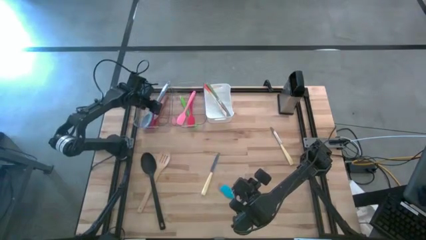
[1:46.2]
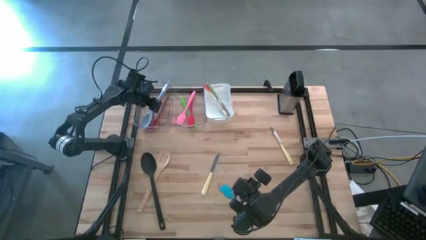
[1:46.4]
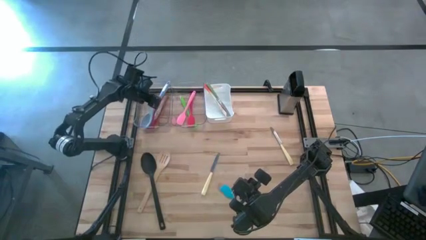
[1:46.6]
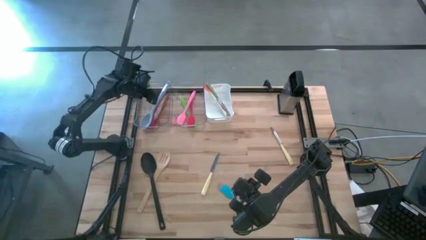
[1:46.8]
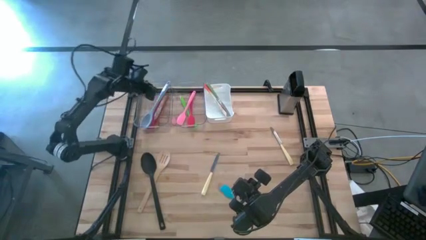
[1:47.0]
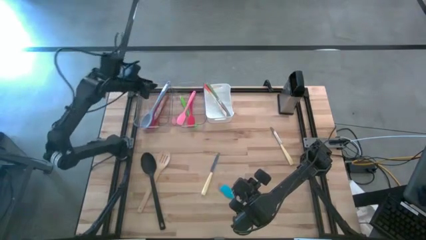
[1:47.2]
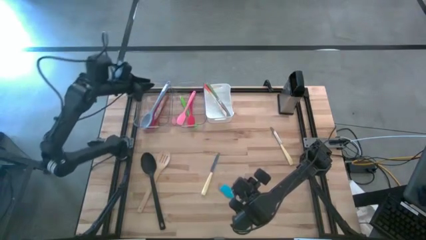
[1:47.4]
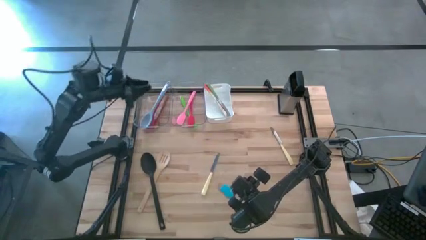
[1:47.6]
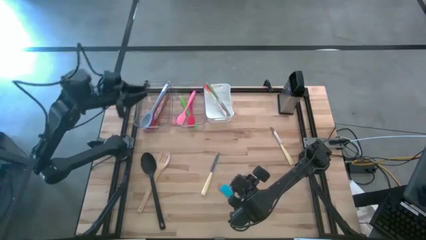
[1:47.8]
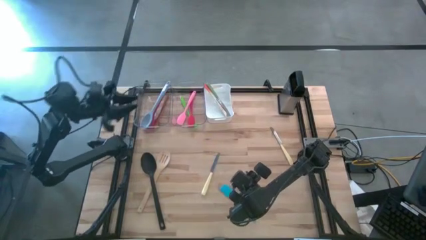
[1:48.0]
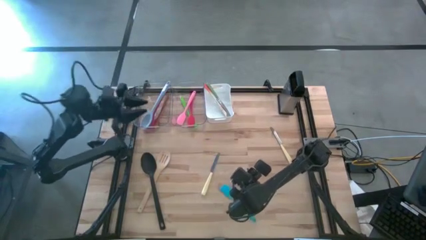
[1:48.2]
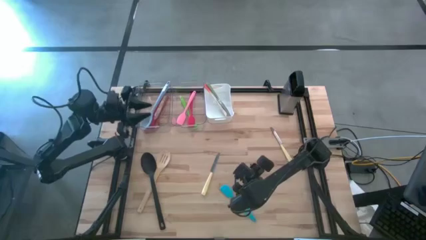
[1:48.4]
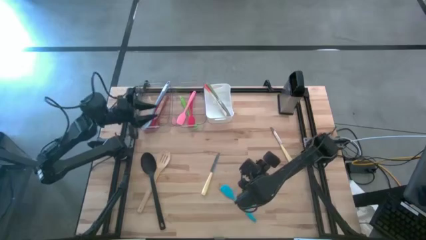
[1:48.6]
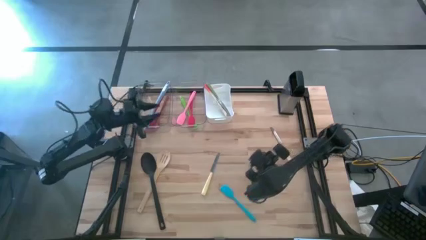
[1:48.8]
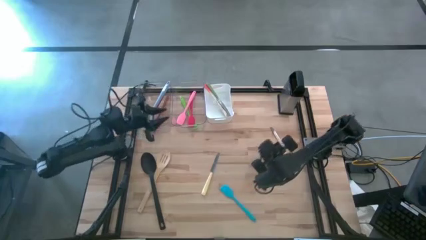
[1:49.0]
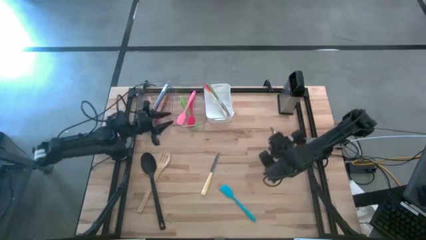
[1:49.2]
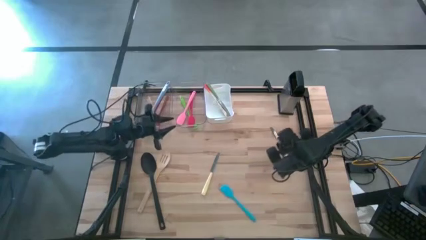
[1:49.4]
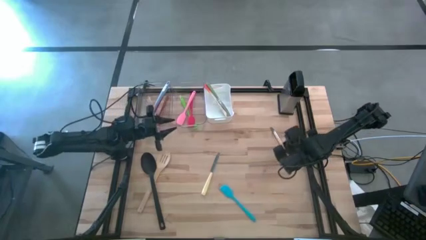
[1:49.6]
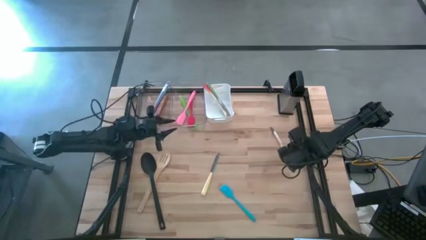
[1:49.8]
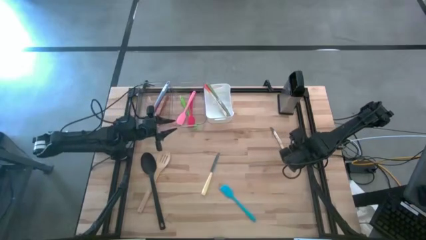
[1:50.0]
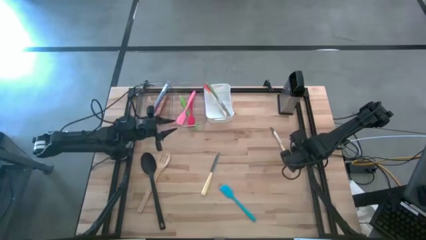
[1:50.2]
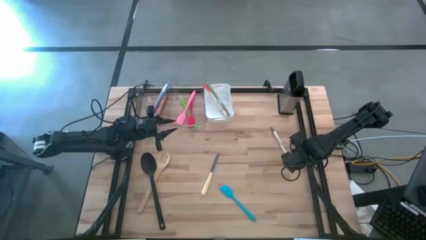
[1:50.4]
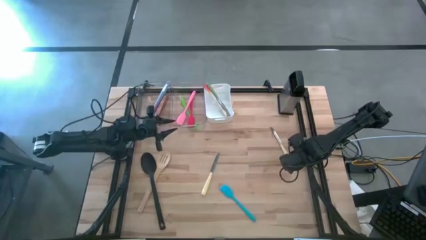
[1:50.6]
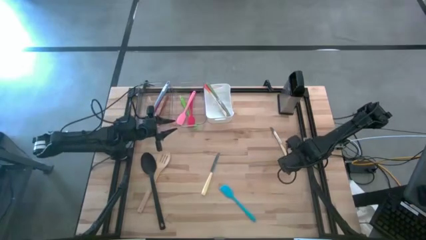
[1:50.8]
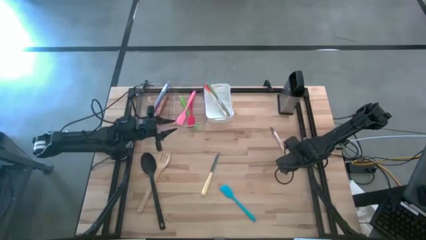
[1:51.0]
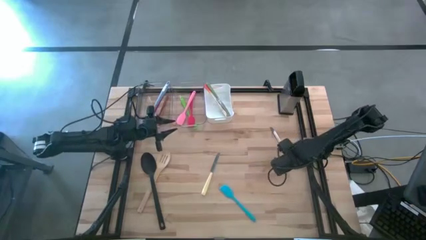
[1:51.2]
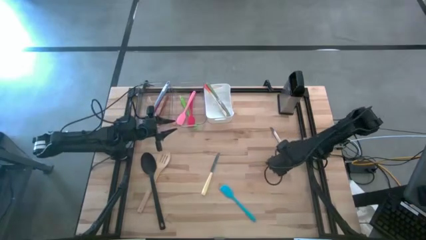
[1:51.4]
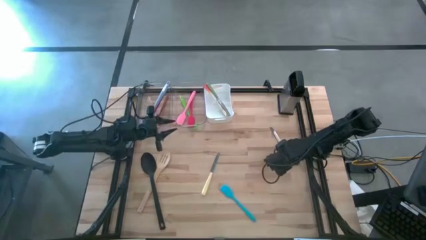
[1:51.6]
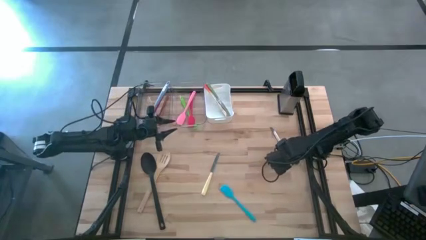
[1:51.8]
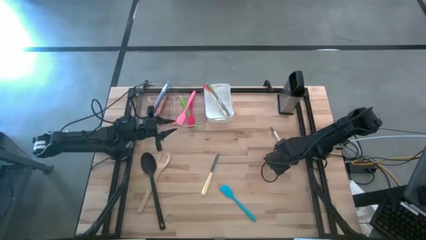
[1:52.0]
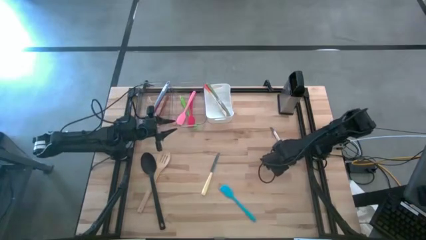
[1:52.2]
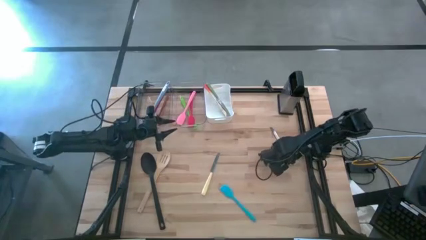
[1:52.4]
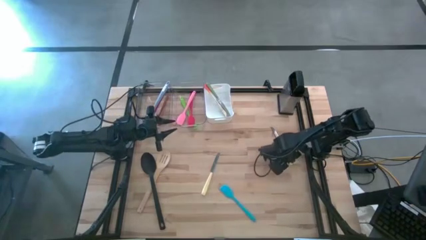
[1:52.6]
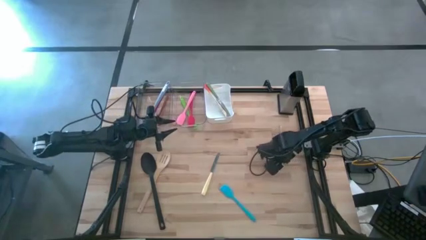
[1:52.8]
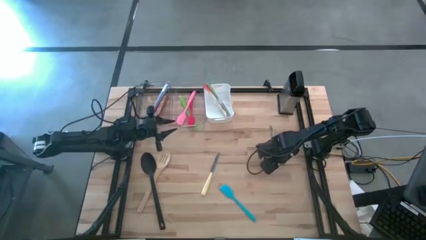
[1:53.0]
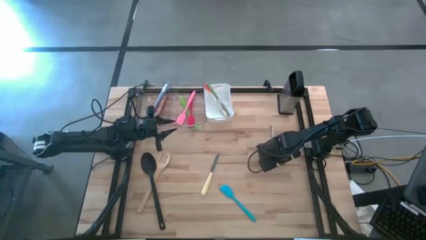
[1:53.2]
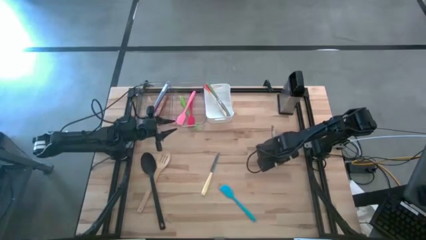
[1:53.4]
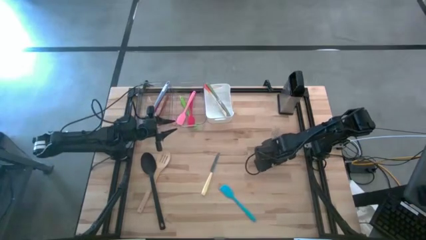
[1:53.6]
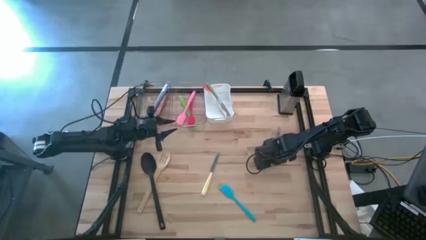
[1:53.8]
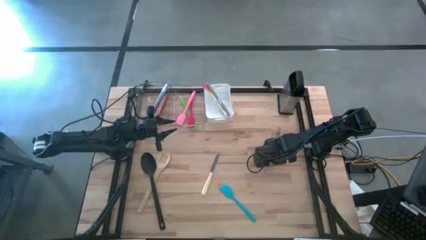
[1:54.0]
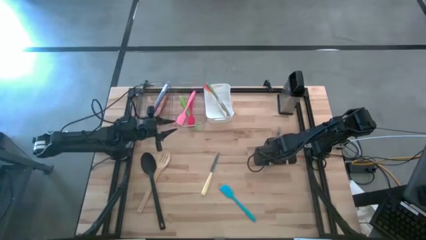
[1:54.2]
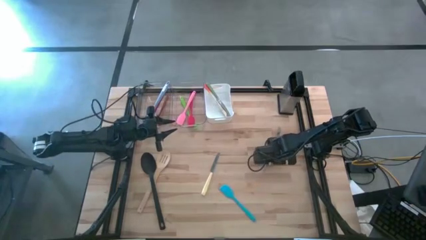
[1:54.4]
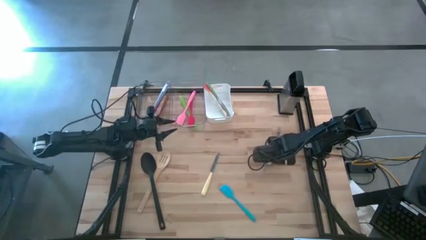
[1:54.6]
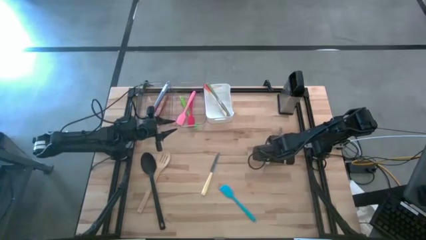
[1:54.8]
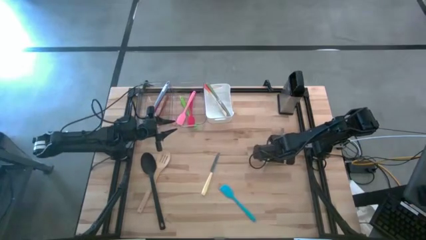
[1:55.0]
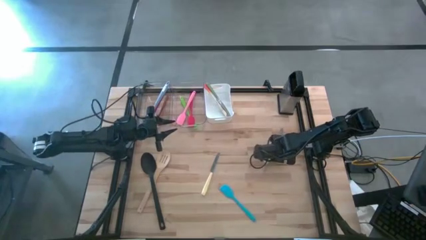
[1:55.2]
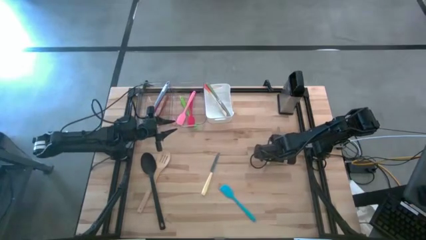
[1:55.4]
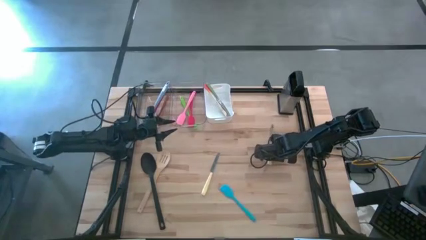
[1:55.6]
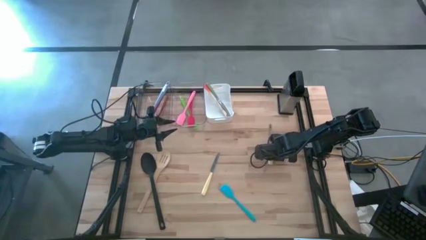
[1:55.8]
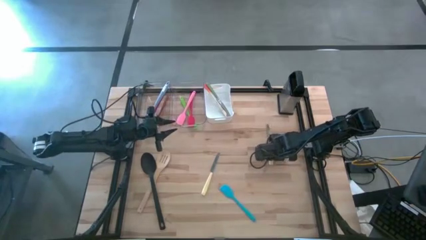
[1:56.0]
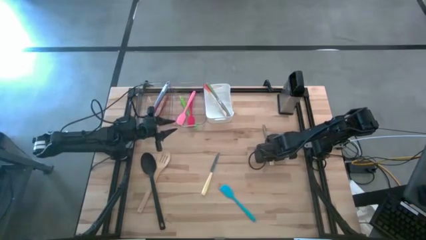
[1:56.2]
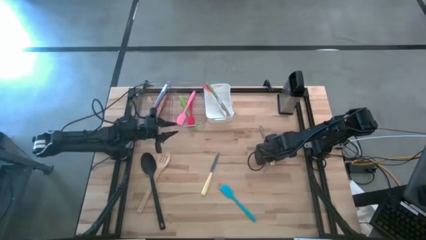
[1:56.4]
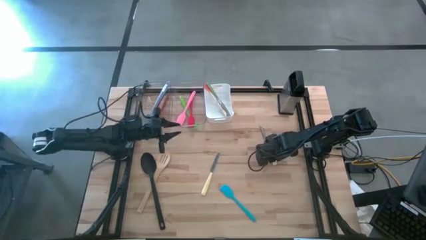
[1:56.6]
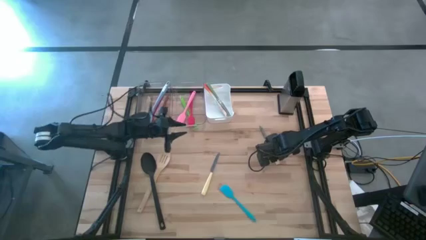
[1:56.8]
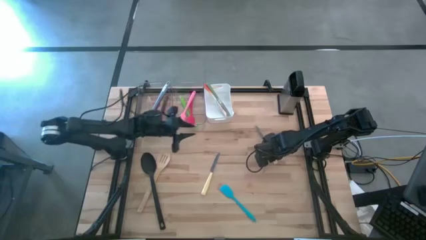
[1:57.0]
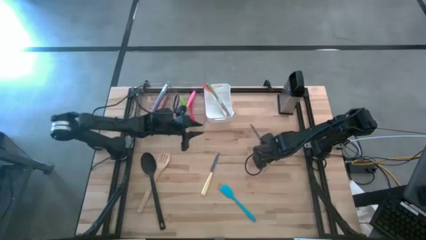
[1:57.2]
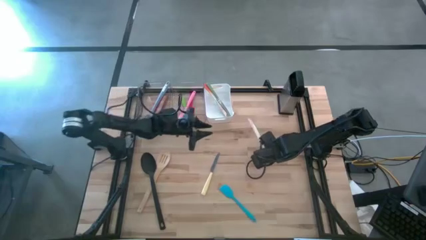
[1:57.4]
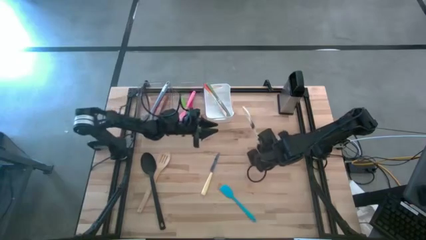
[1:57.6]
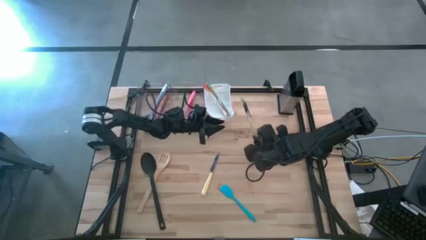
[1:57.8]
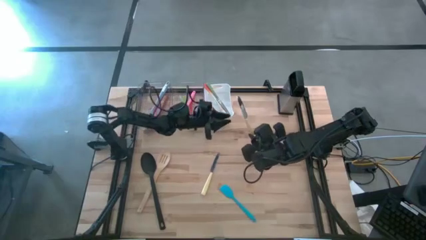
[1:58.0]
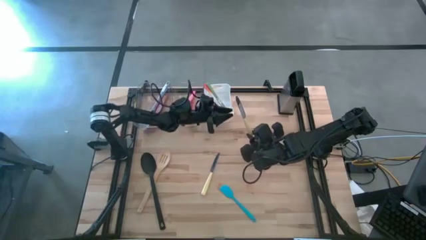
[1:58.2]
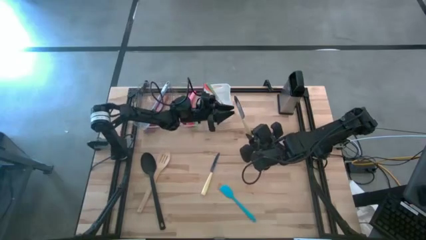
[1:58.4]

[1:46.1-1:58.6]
Task: Pick & Place Kitchen Items
Put the top yellow table knife into the white bin

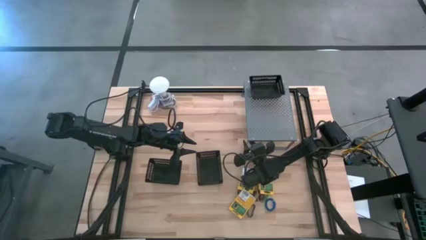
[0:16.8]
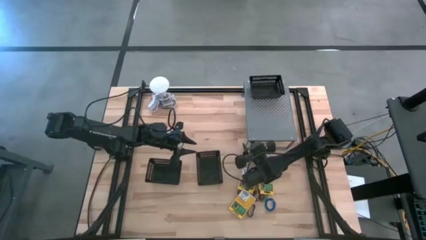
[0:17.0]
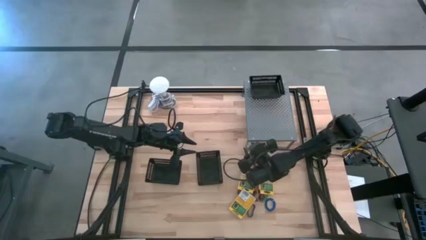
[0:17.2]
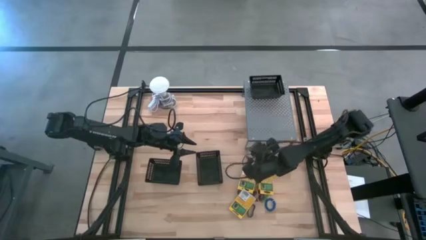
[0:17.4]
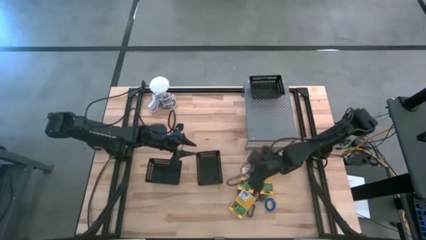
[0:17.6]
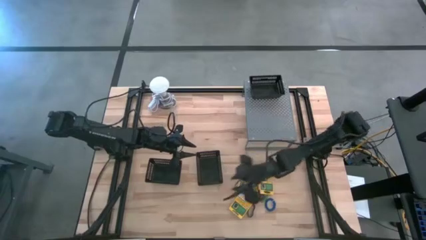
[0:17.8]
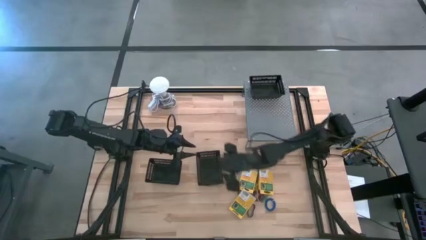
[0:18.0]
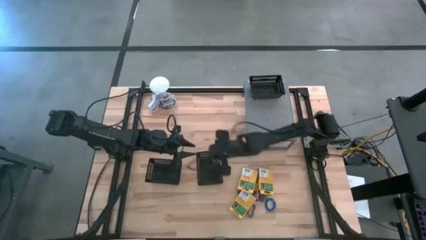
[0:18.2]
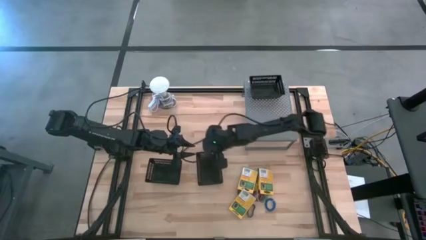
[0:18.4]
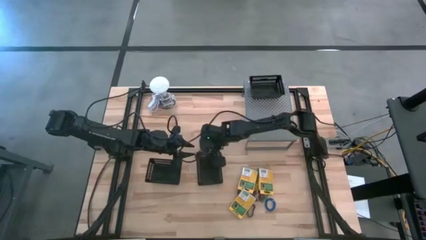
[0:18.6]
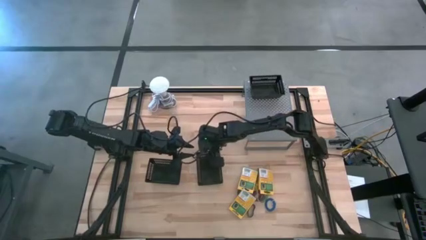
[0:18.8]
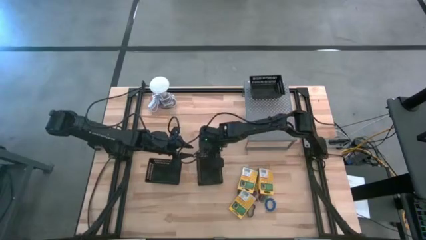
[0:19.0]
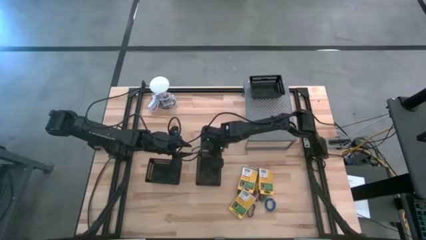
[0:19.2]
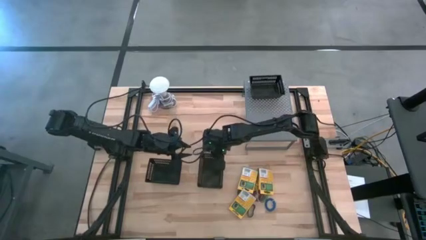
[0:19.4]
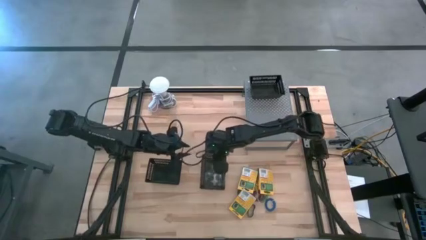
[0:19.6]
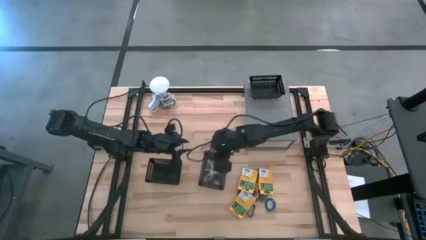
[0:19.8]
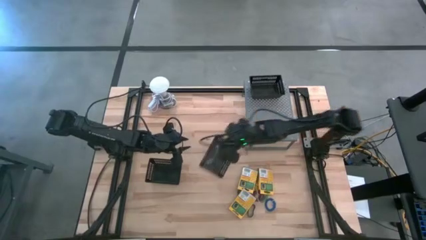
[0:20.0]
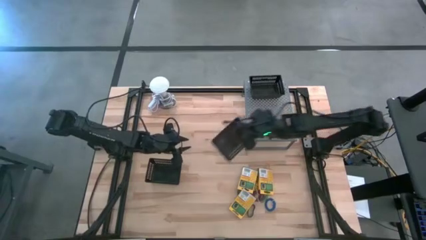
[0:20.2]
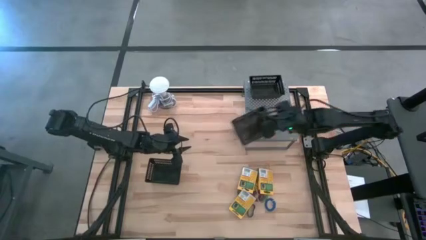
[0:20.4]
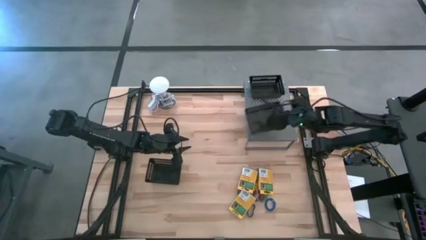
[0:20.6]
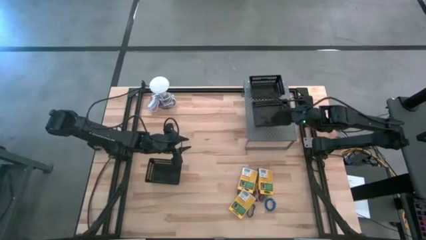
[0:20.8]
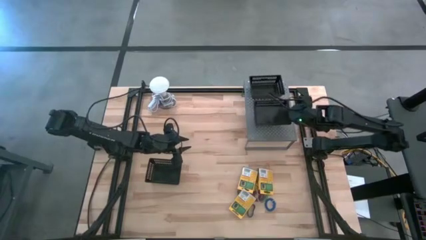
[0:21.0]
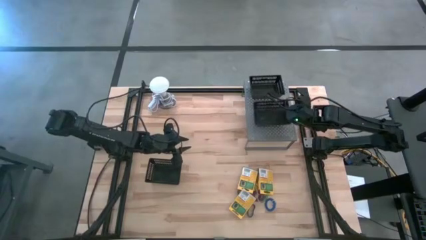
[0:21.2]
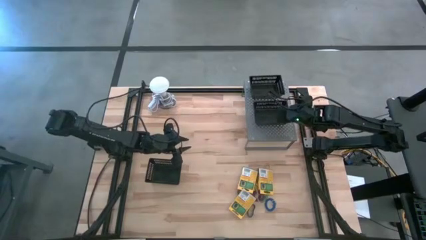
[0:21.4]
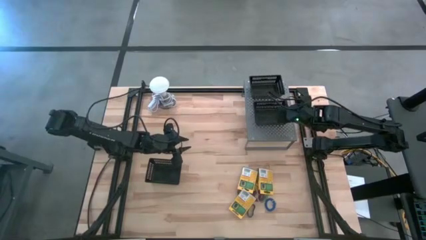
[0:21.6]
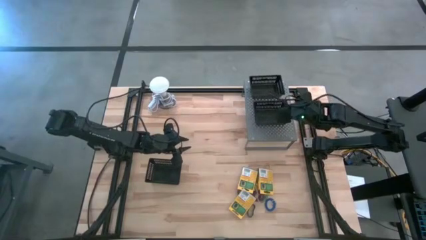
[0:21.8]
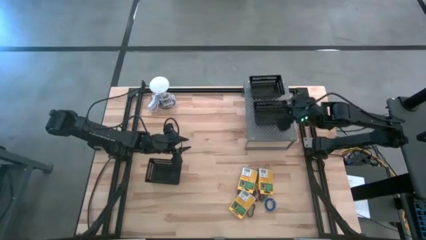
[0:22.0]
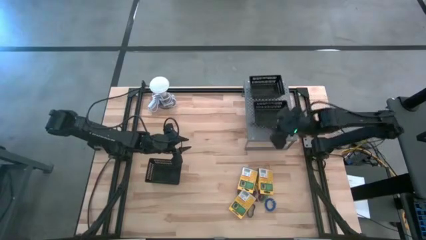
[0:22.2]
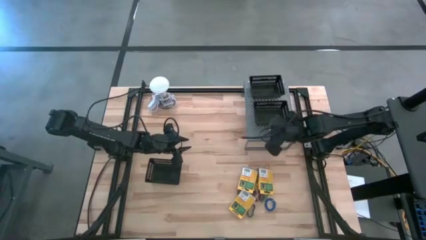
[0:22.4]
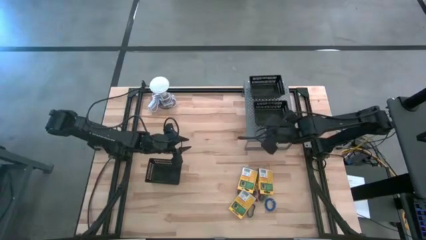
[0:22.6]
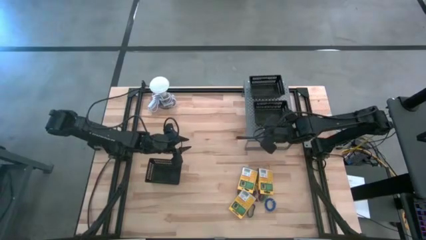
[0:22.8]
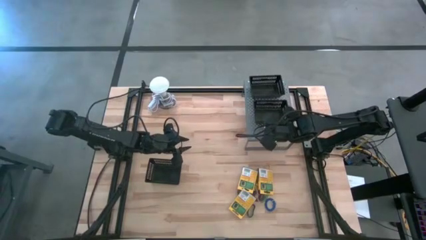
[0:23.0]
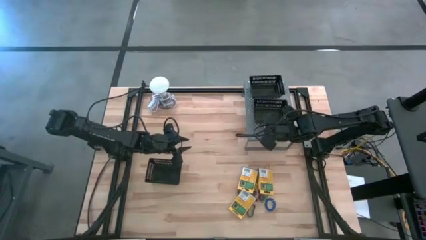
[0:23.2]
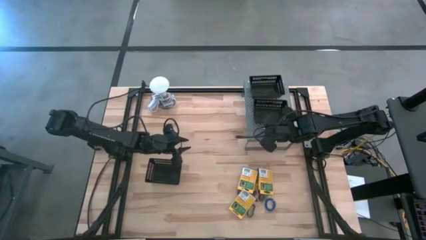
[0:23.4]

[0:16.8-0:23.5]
Task: Pick & Place Office Desk Supplies
Put the black bin on the shelf
